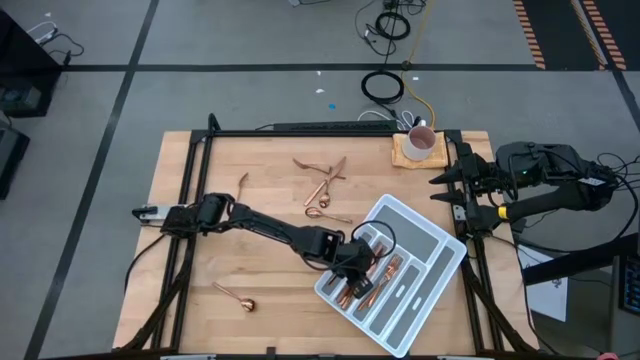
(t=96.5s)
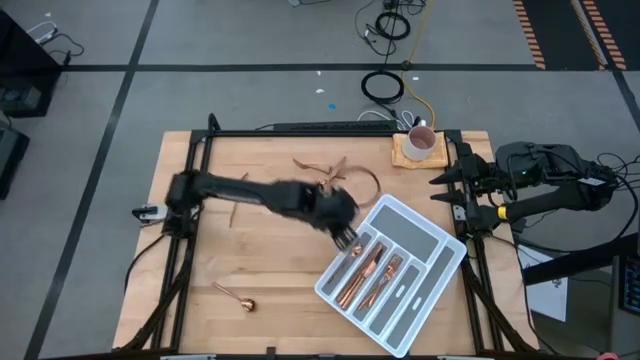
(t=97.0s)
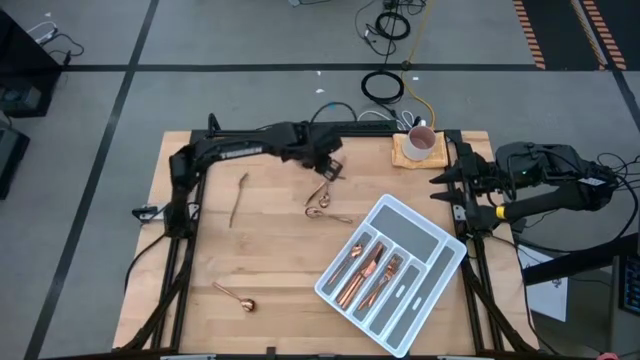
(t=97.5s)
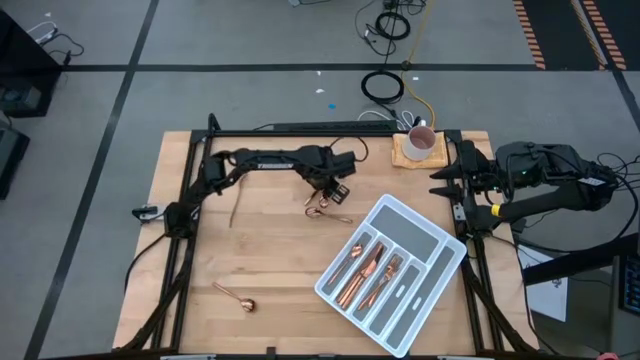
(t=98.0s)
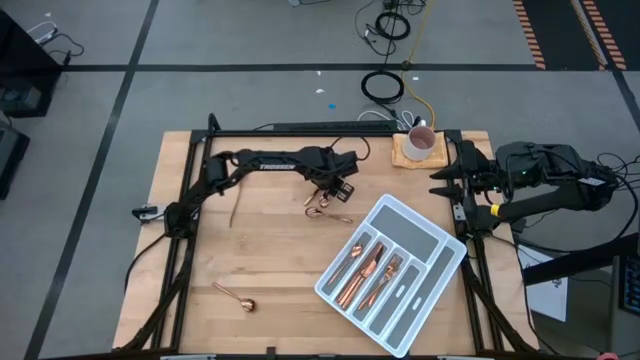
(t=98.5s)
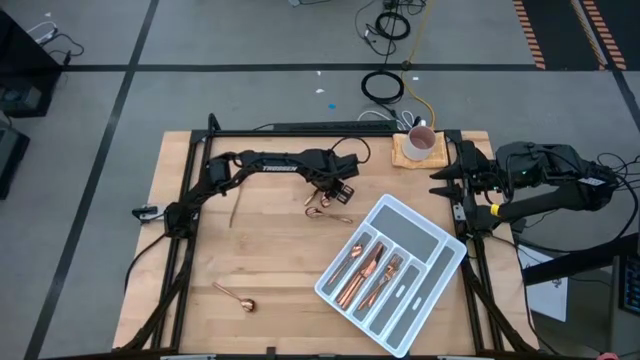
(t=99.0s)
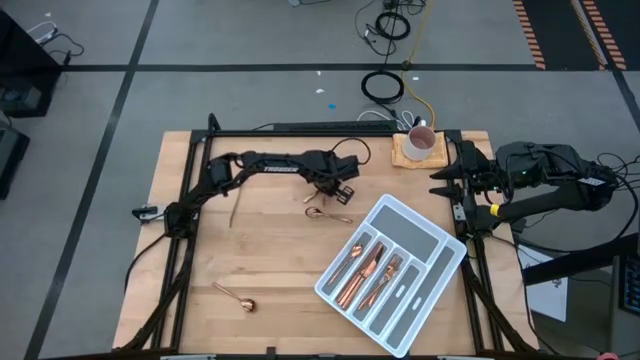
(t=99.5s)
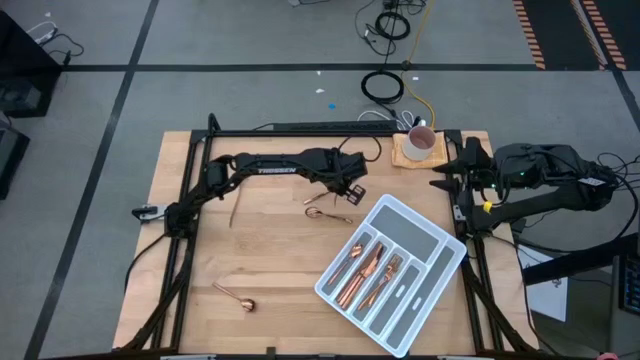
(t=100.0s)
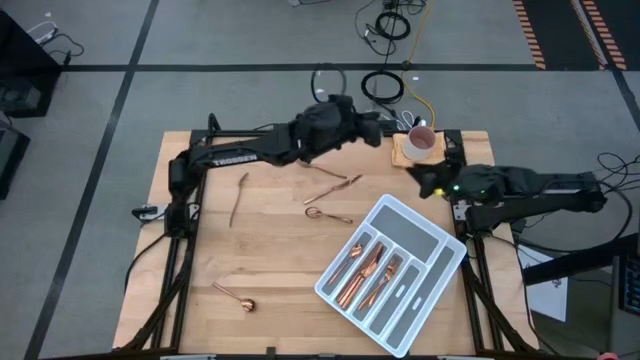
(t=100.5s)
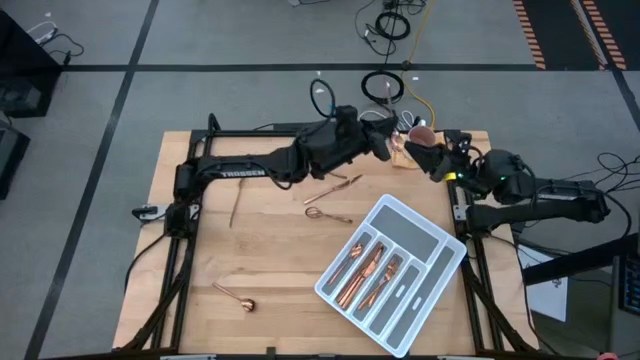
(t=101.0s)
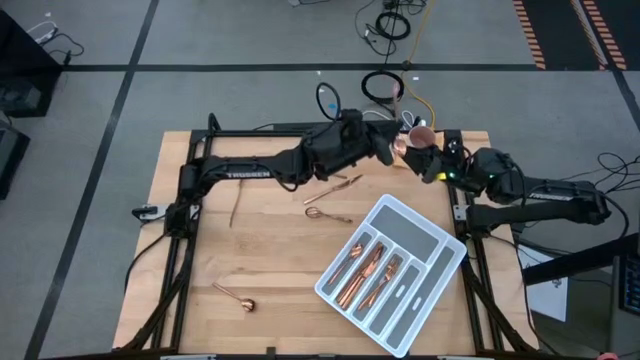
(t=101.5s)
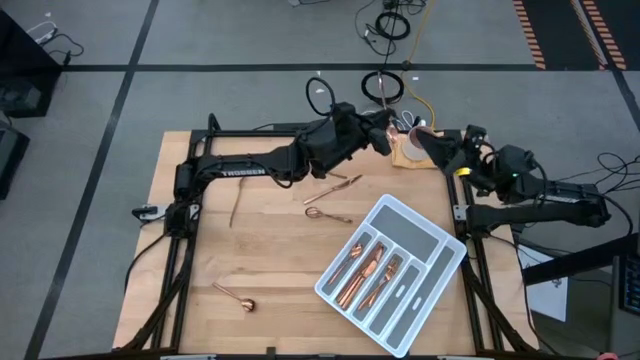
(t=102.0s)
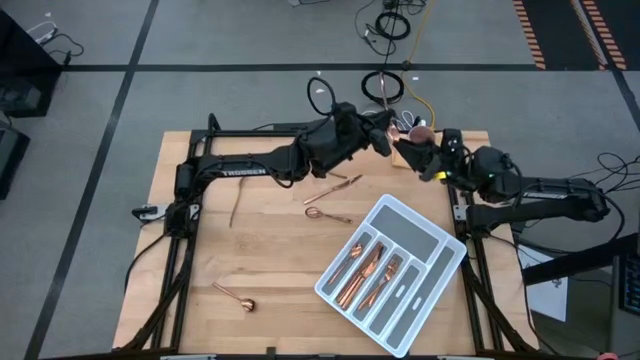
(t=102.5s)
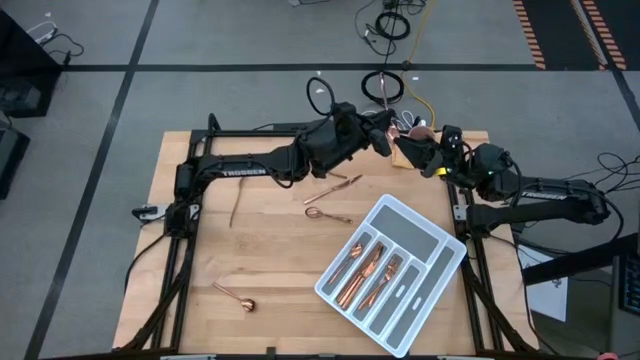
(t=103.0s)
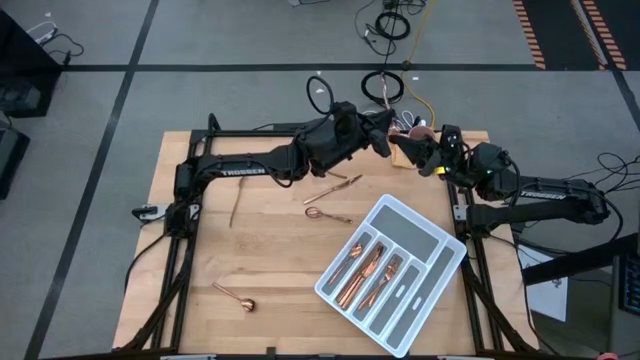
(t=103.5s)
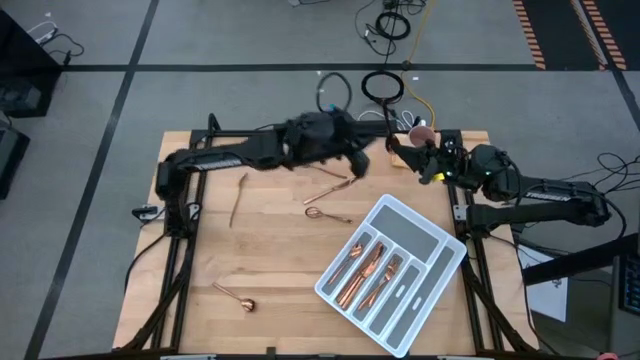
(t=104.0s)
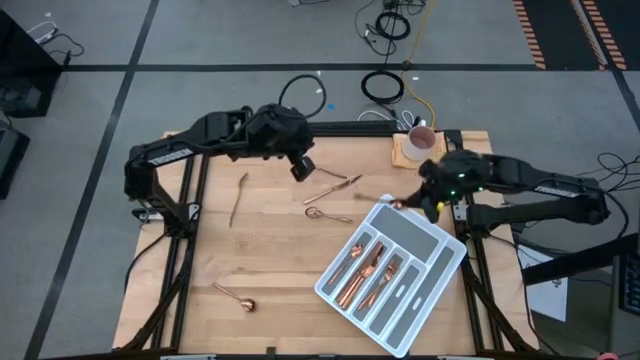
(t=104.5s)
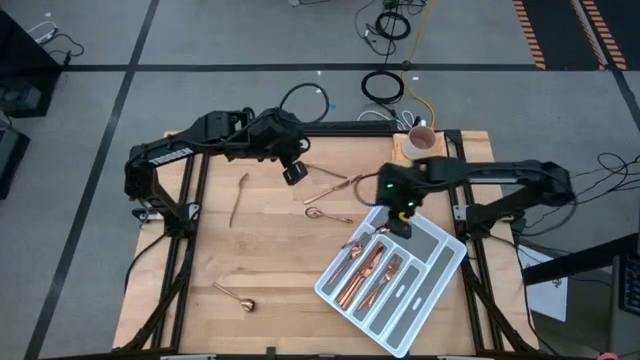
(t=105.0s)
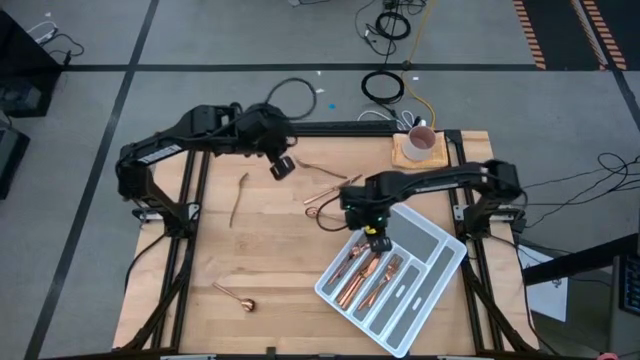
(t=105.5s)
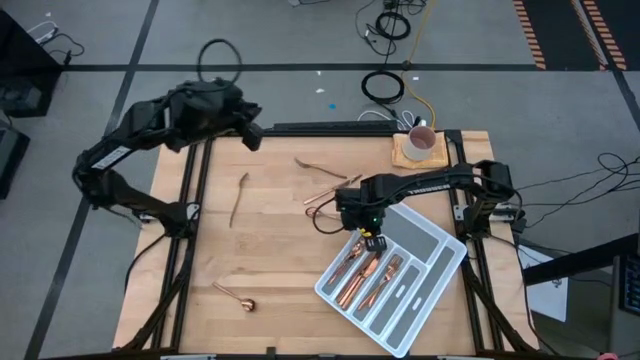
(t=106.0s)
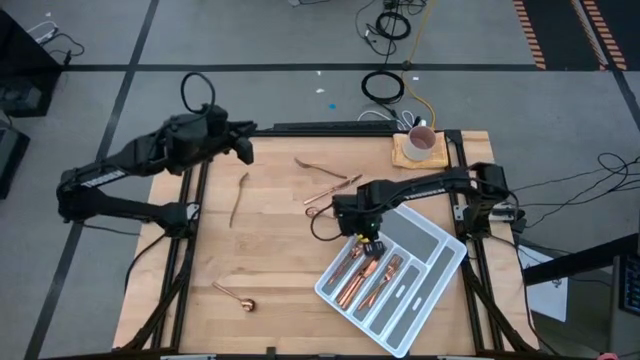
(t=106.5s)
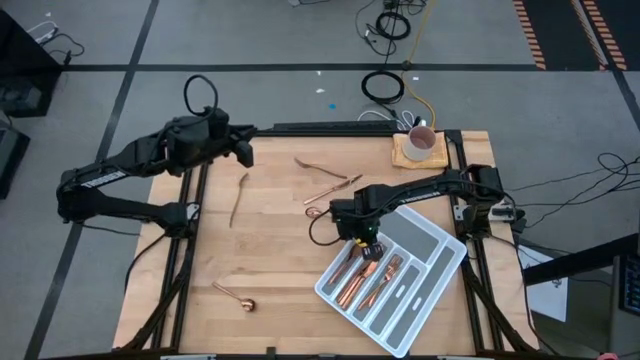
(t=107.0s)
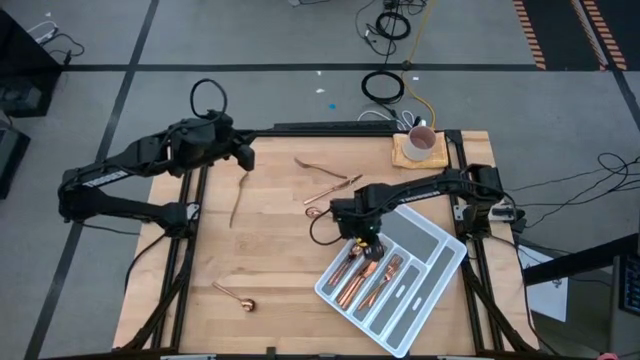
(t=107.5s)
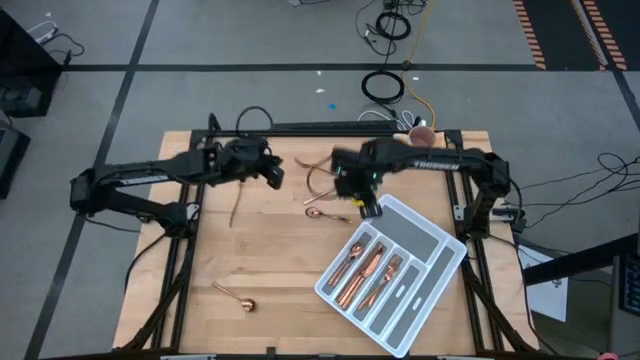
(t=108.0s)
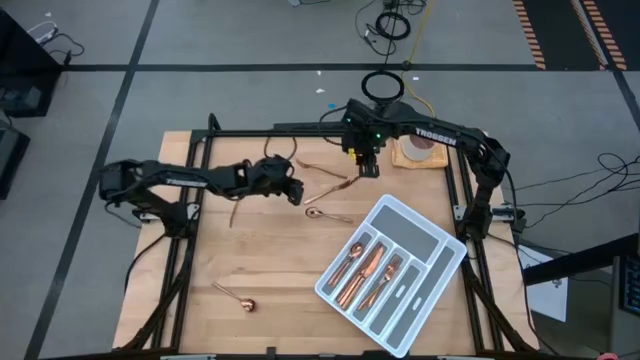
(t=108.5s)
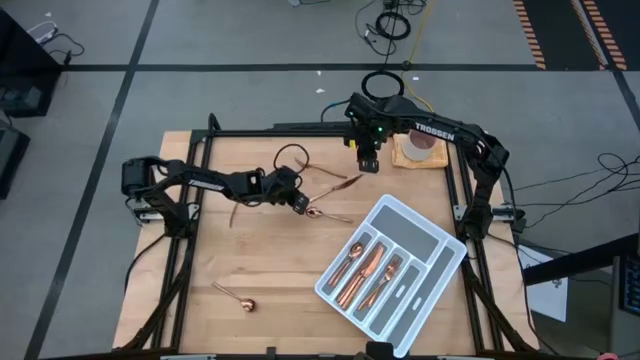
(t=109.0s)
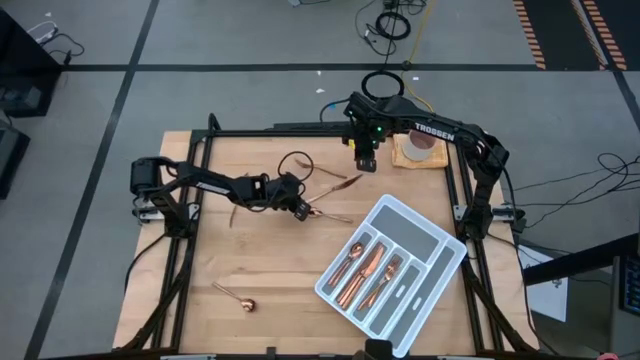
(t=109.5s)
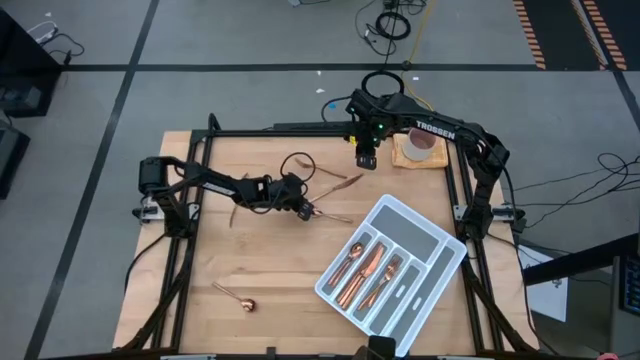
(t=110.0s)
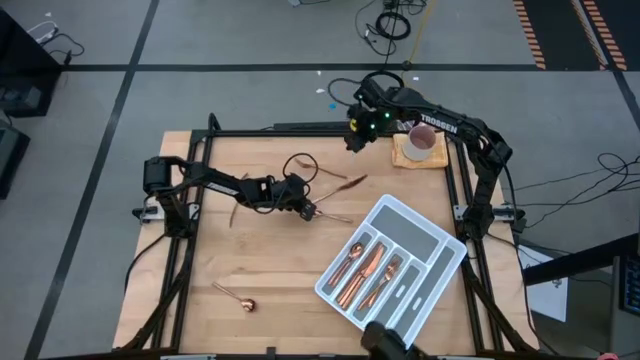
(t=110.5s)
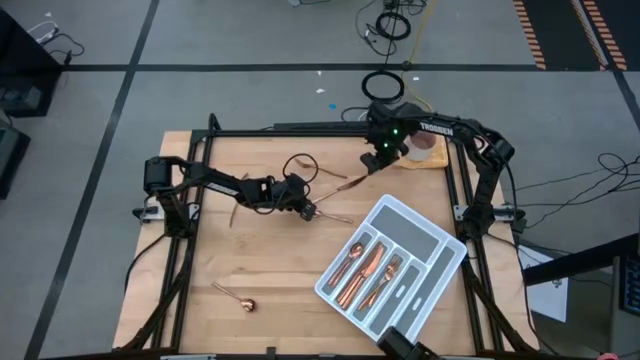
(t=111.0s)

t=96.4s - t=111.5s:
Task: Sort silverware
Put the gold spoon into the cutlery tray with the other gold spoon

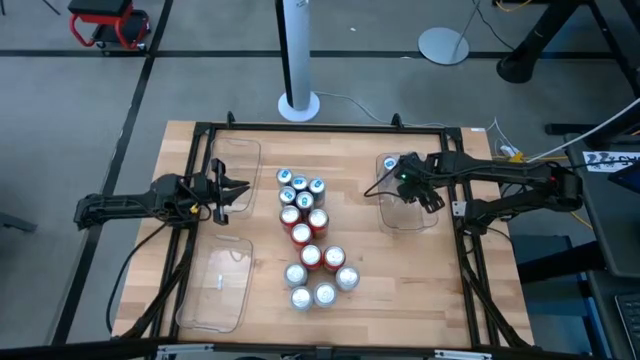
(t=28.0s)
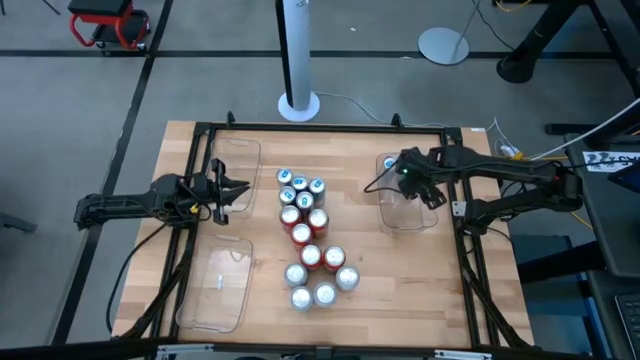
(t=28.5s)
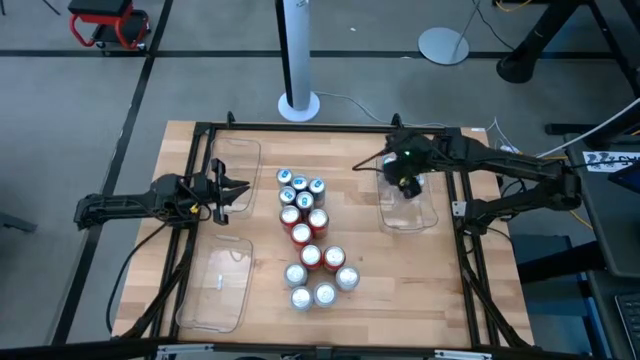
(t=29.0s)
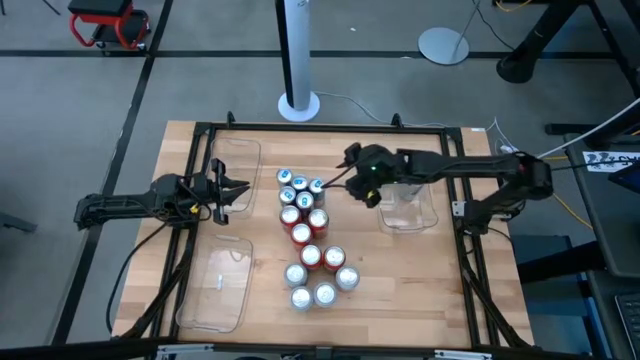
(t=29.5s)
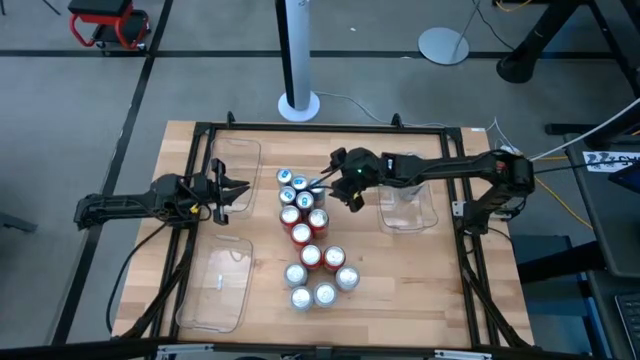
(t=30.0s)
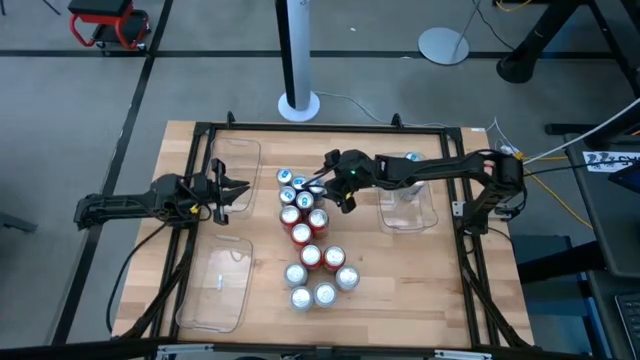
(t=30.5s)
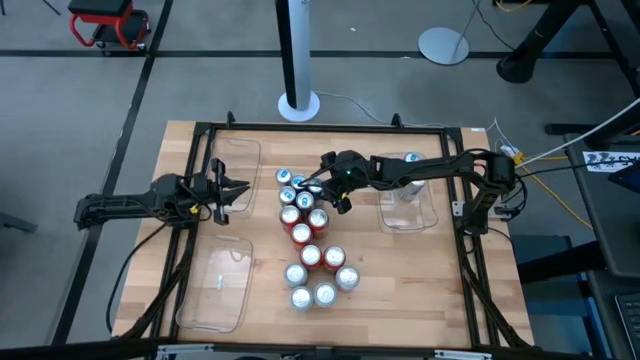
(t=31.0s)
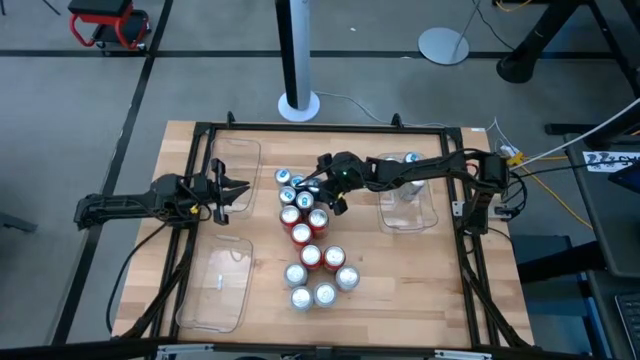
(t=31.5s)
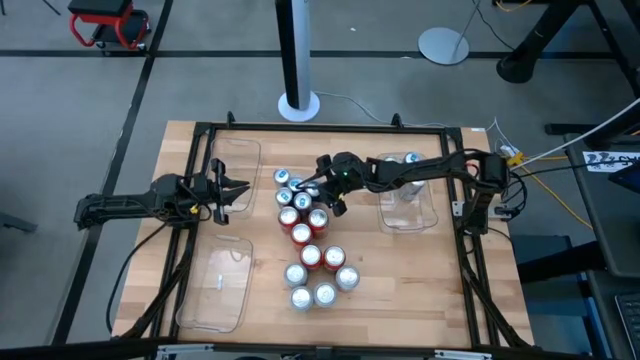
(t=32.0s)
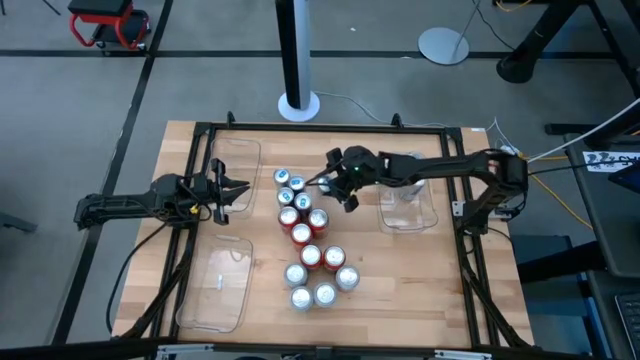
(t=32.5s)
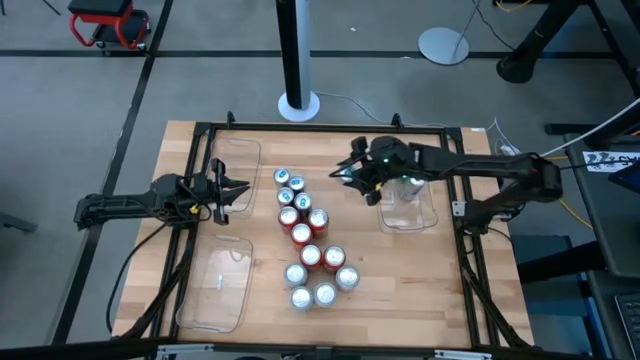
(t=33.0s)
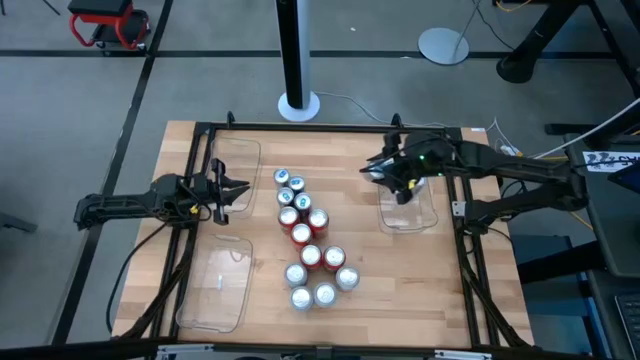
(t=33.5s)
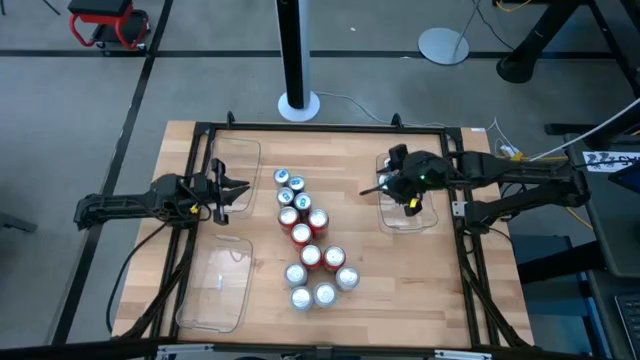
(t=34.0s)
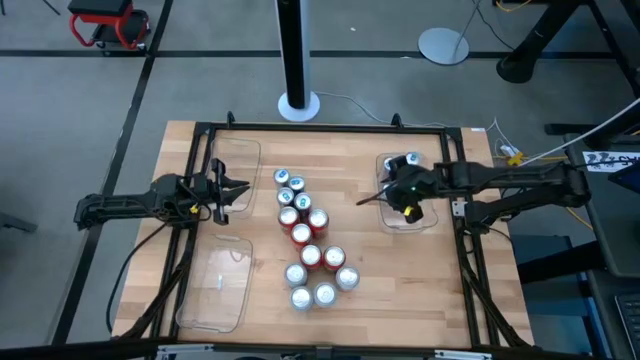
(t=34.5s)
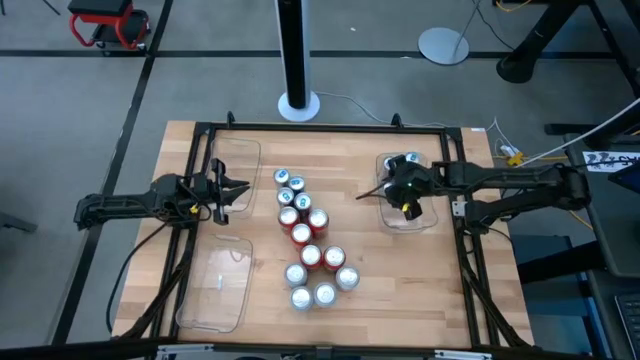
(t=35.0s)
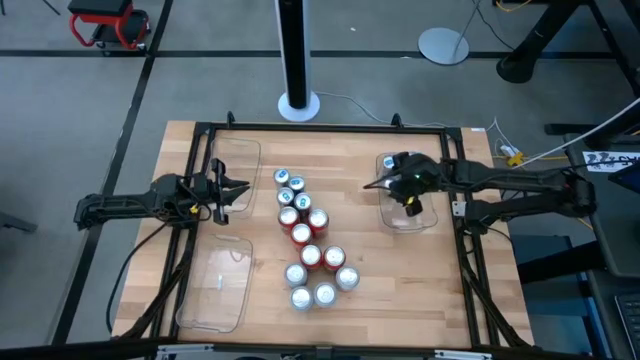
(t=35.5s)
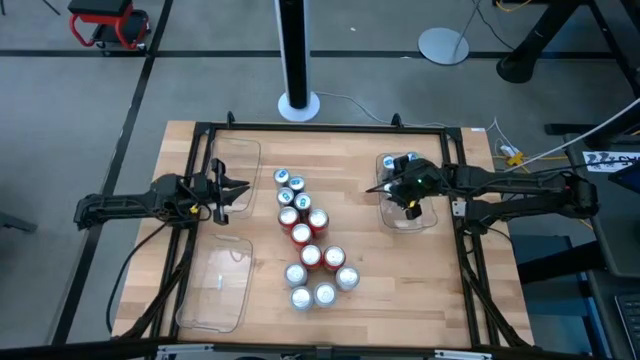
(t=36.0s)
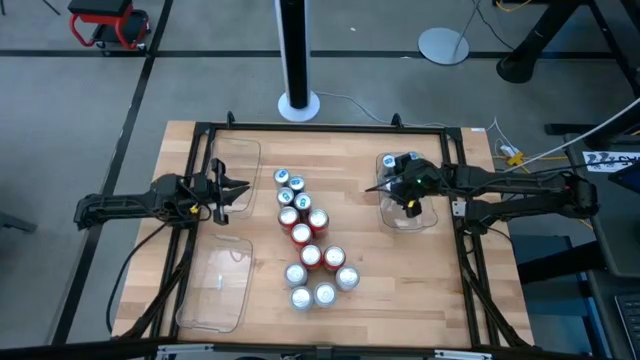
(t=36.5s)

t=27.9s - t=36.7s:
Task: Sort soda cans
Put the blue soda can into the middle right transparent bin
